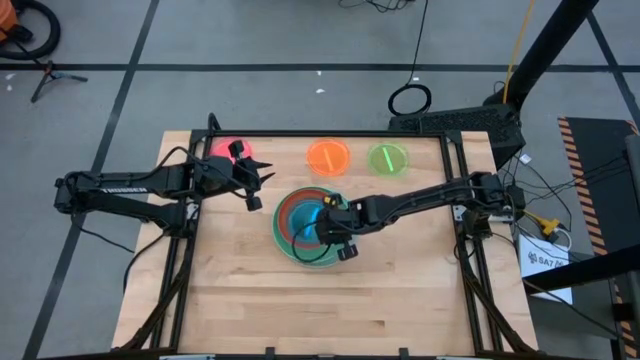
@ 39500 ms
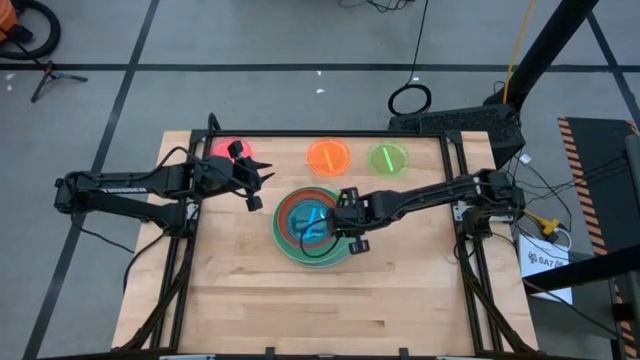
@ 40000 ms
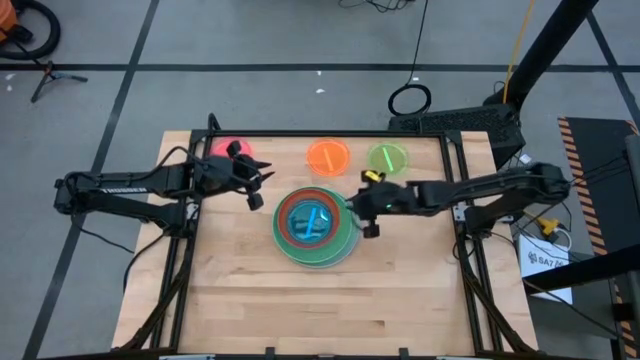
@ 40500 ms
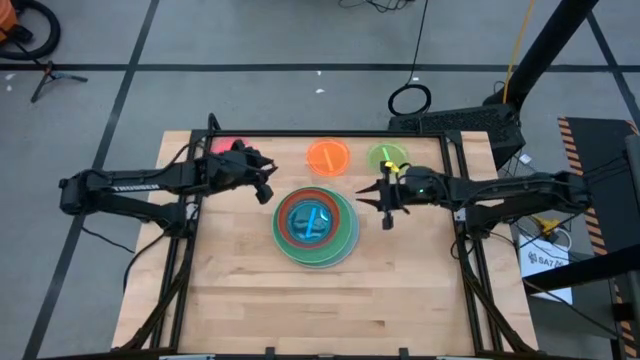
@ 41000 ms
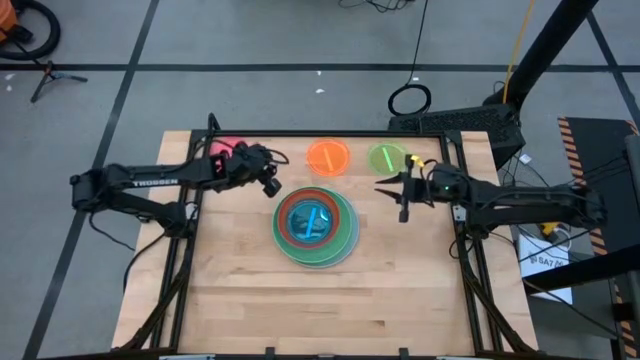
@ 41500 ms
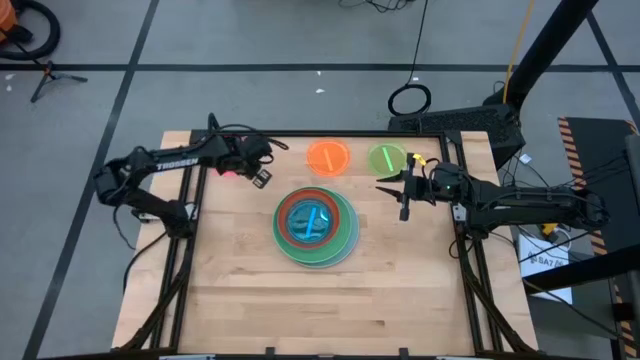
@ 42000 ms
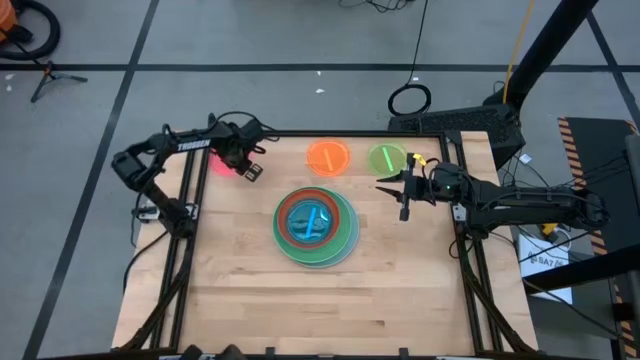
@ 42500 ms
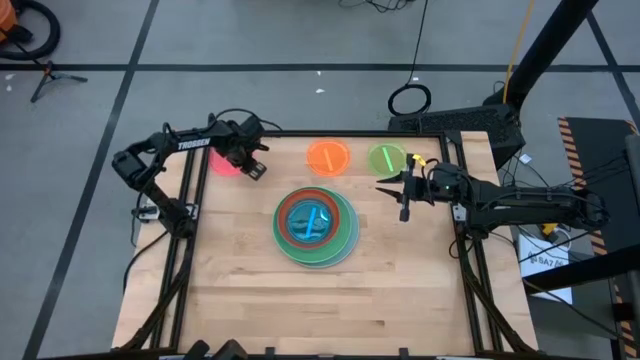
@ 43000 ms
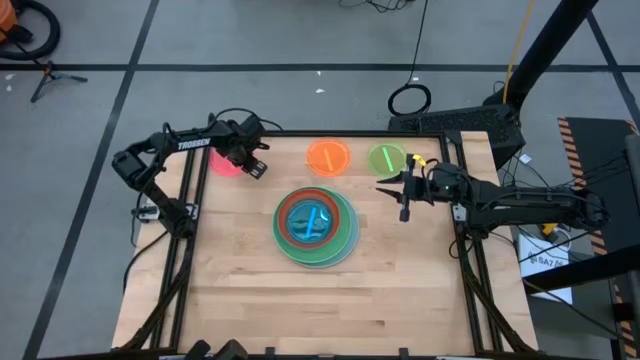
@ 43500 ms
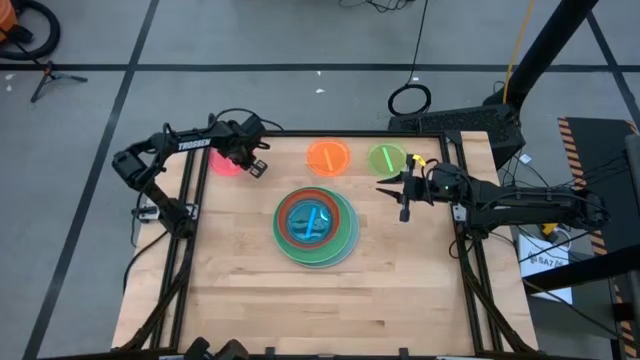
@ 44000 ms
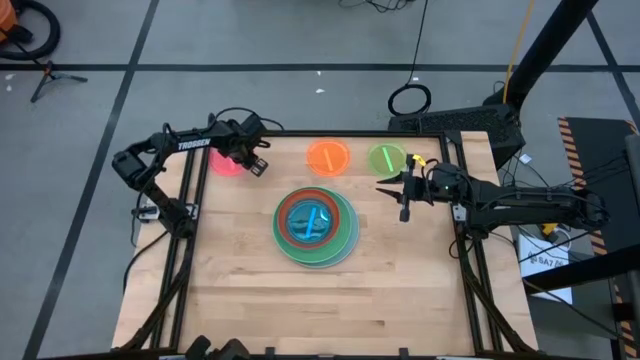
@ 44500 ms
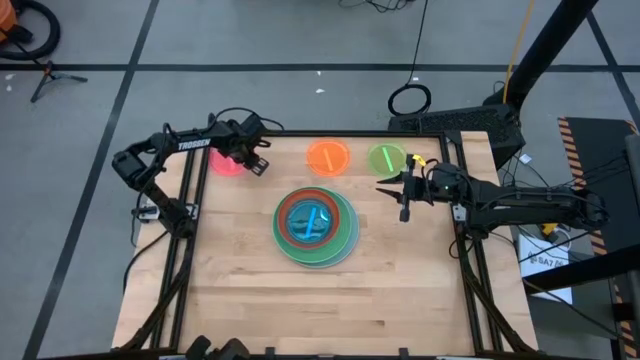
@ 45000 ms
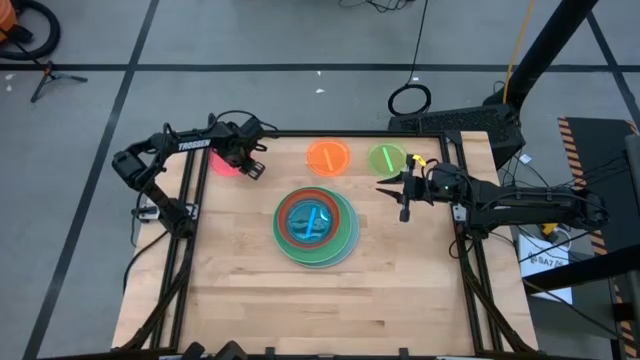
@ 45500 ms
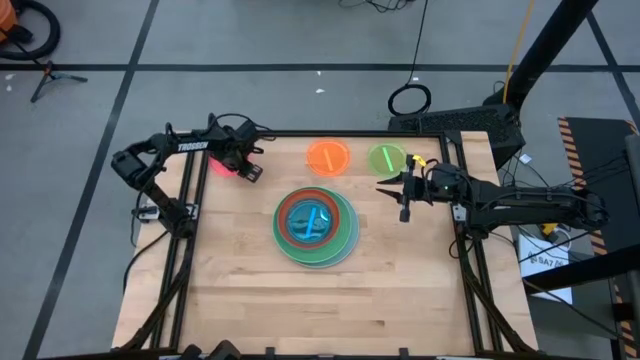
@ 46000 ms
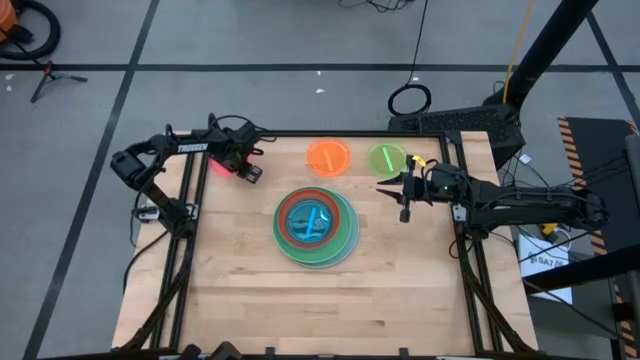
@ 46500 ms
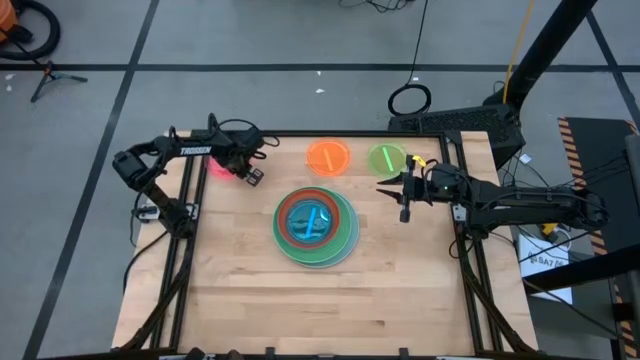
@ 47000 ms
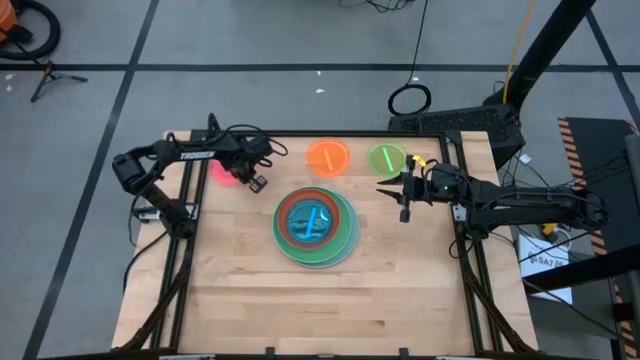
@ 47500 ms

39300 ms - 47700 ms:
Task: Stack plastic plates
Stack the pink plate on top of the blue plate

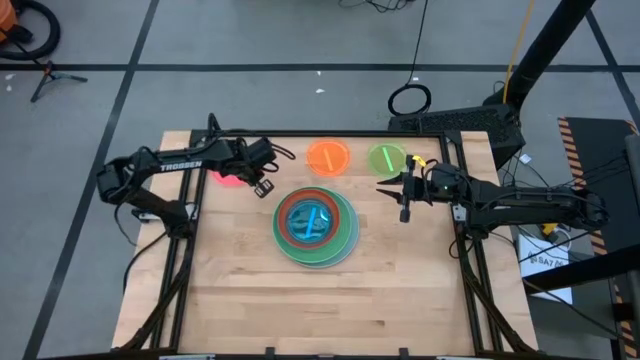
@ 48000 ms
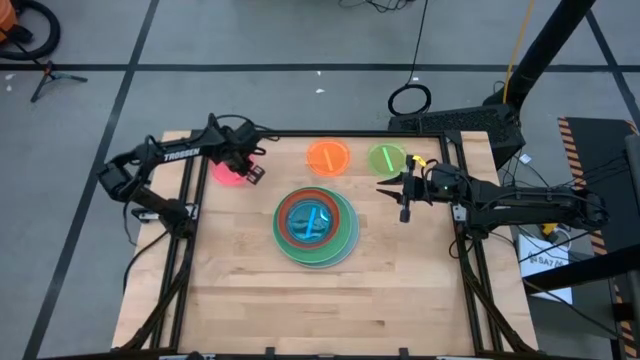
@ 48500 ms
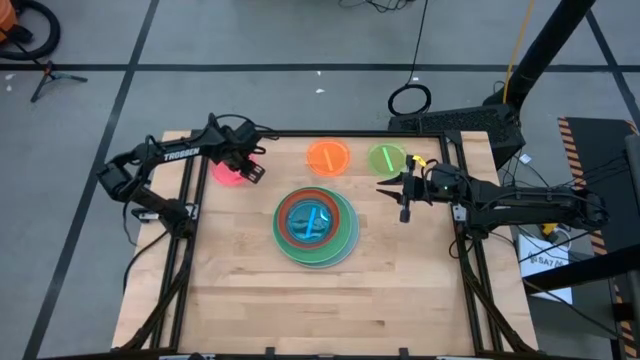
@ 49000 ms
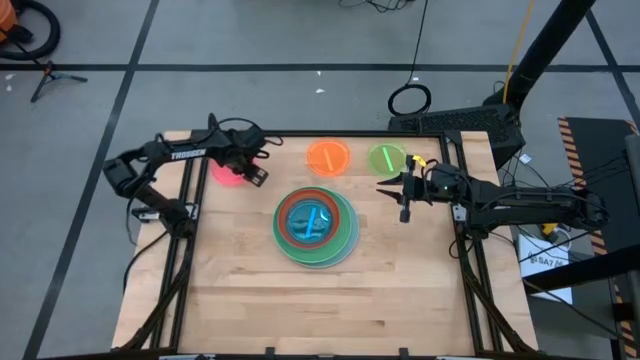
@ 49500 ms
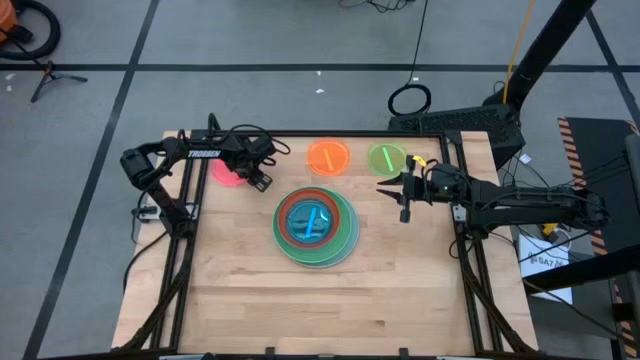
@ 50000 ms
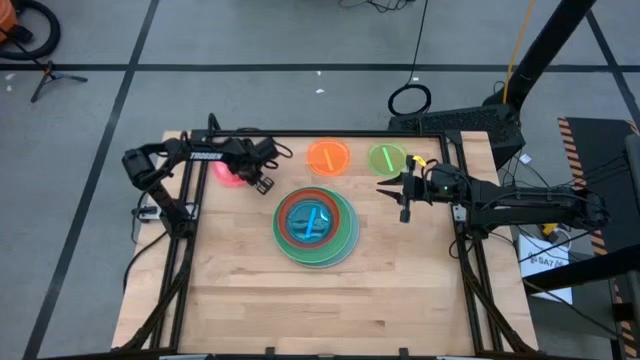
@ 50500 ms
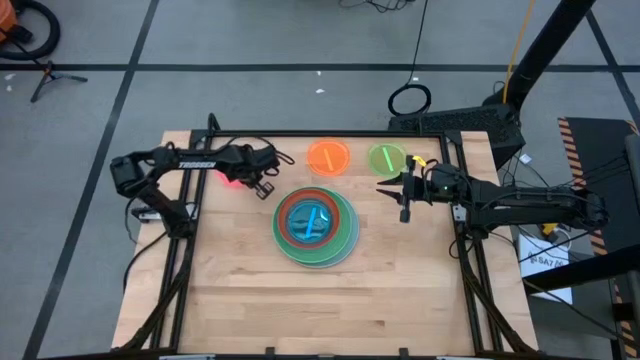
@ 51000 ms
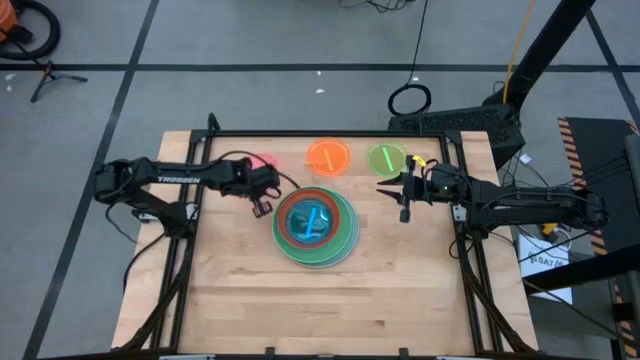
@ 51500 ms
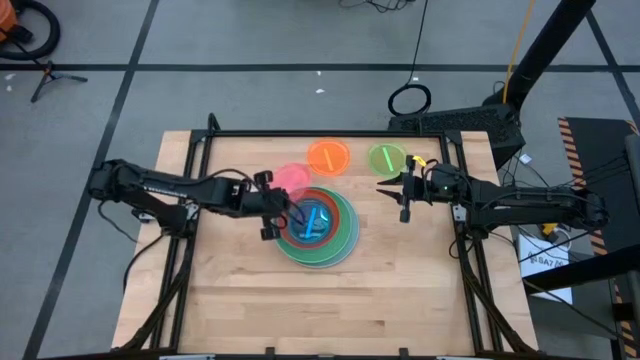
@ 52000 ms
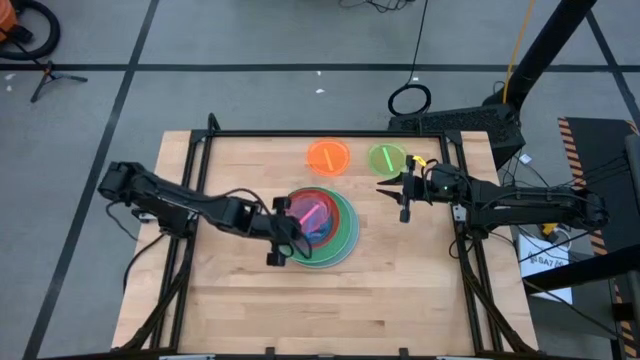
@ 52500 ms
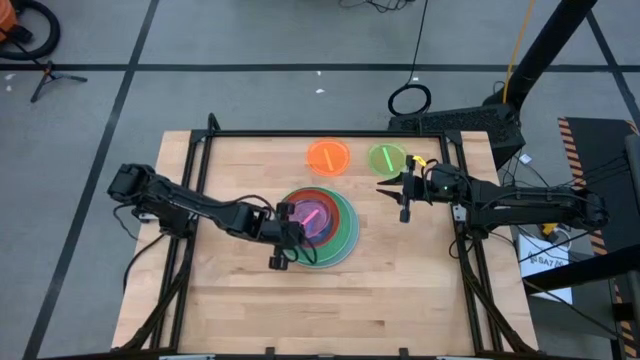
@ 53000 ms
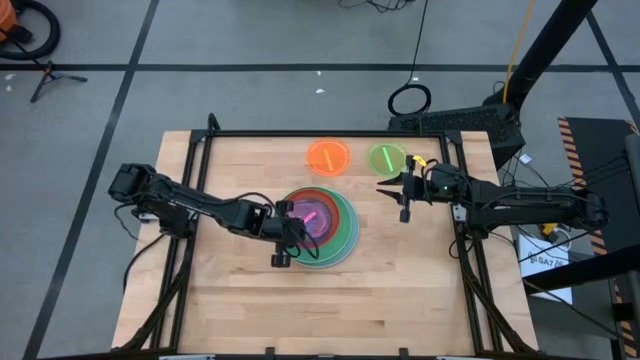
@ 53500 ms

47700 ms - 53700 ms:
Stack the pink plate on top of the blue plate

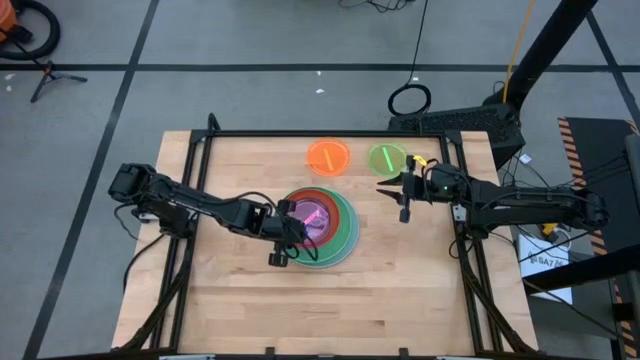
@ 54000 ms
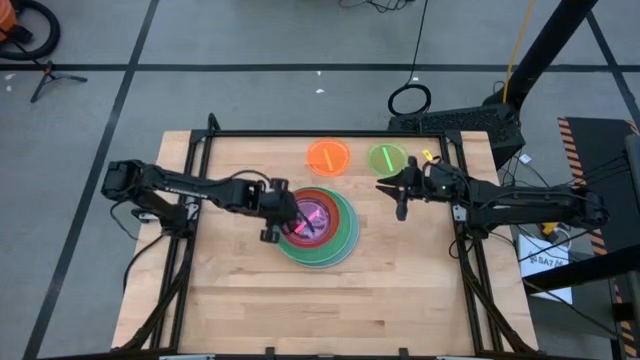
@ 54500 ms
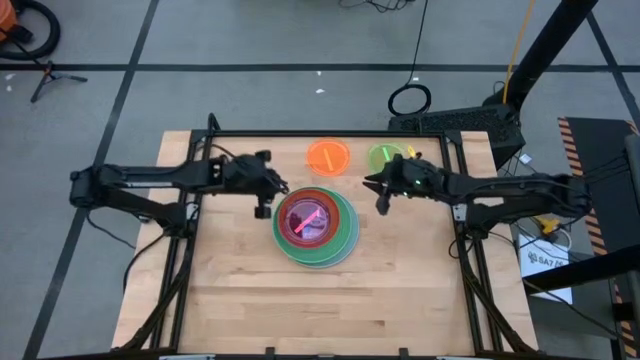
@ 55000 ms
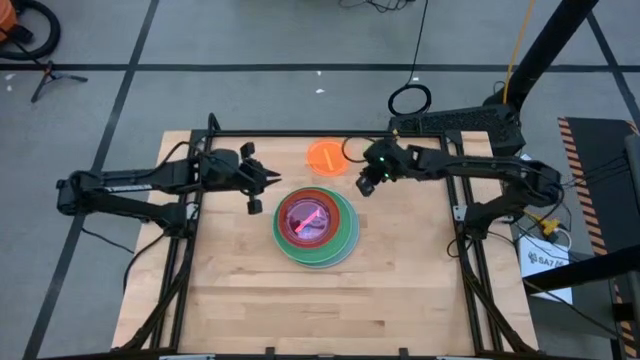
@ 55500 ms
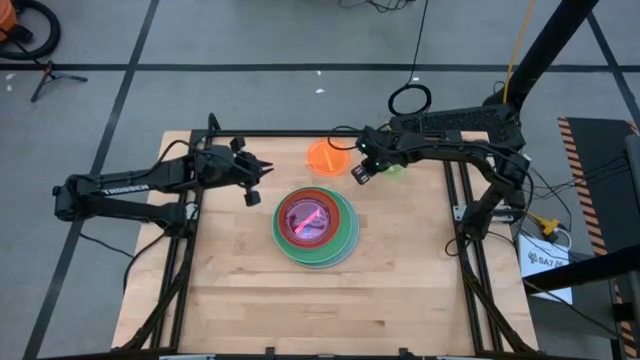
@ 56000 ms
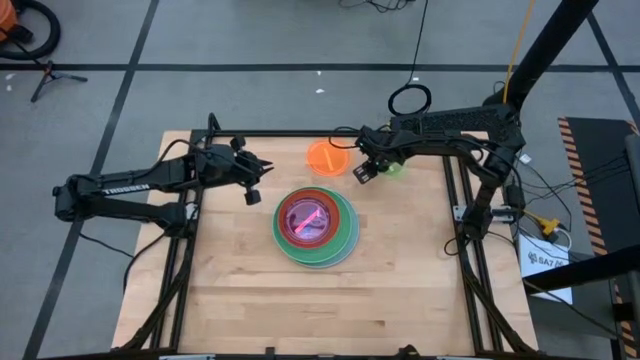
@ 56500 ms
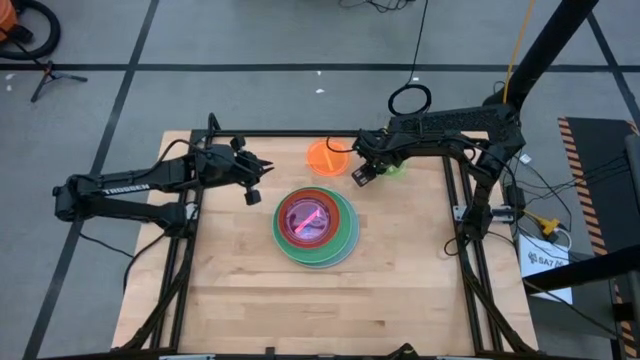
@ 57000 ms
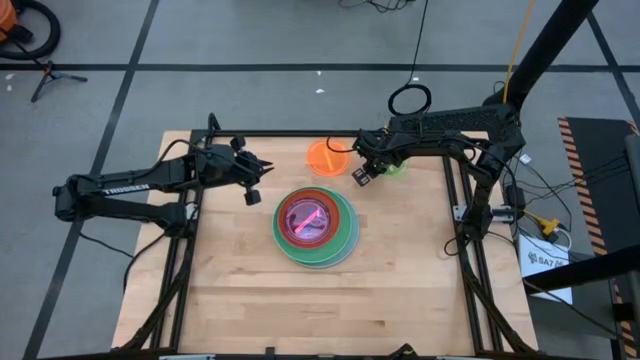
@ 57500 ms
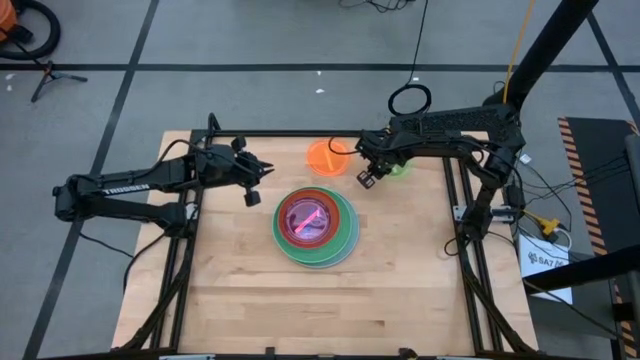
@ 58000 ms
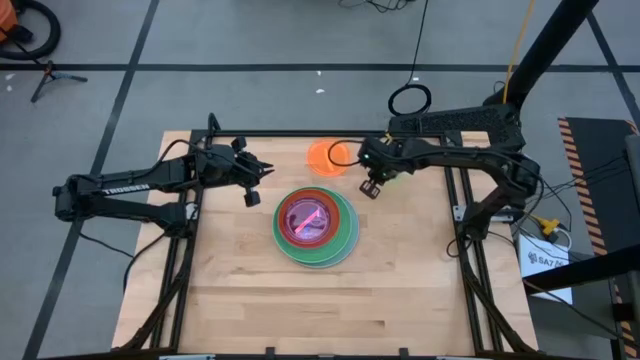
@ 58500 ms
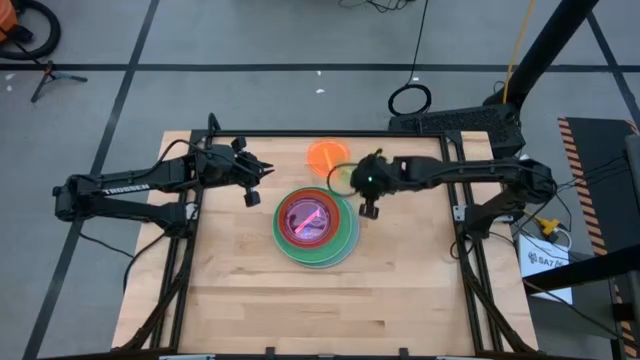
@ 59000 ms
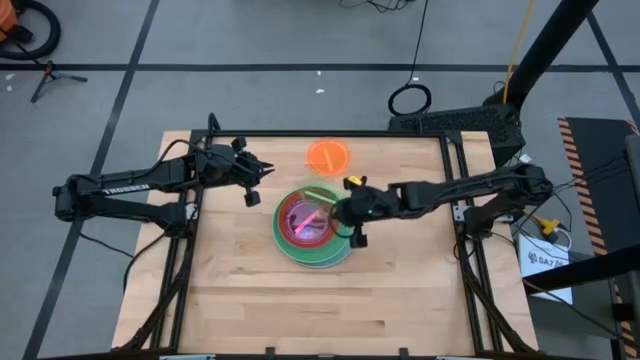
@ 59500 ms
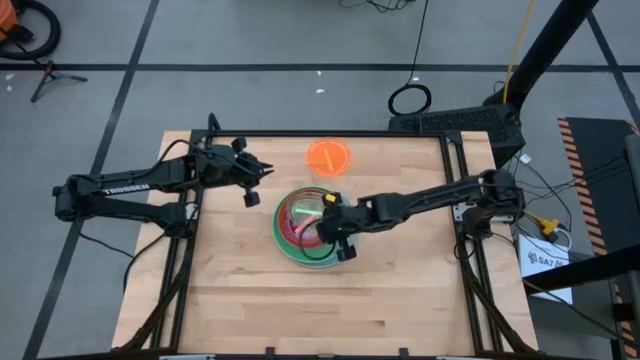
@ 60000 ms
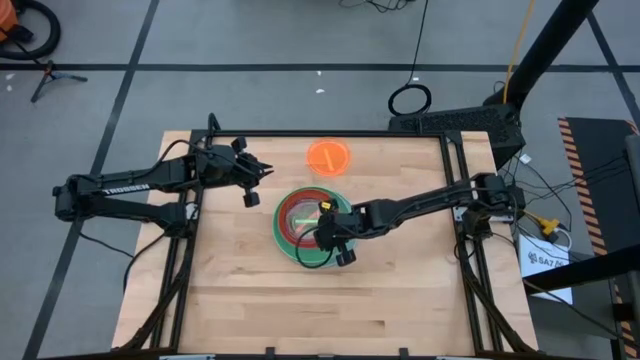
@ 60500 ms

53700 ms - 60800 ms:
Stack the light green plate on top of the pink plate

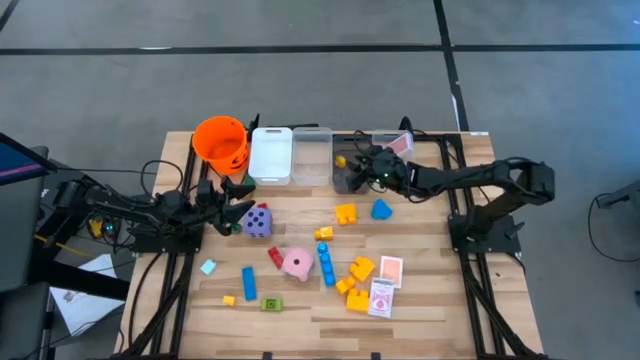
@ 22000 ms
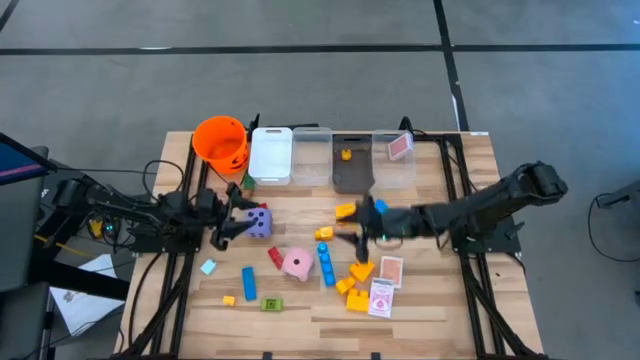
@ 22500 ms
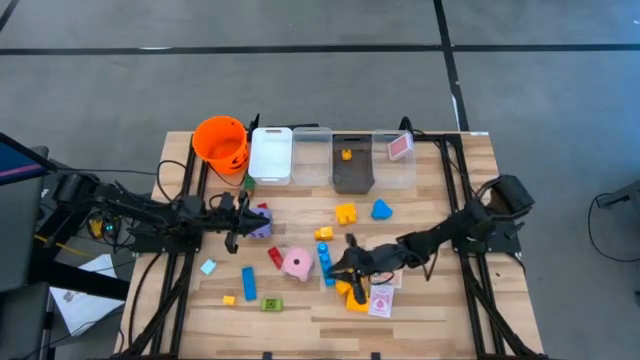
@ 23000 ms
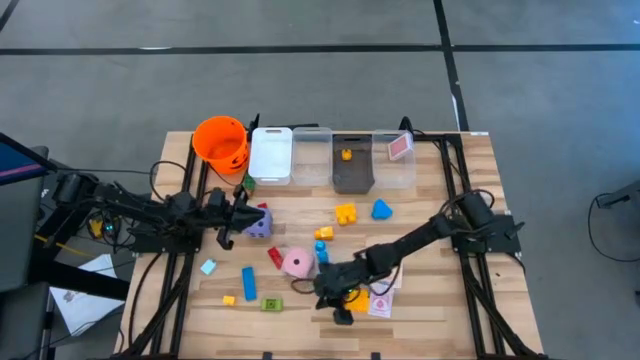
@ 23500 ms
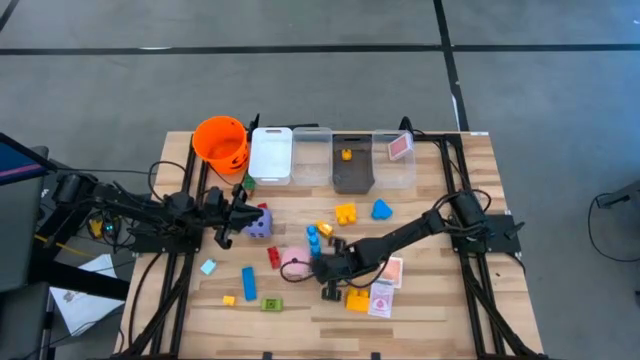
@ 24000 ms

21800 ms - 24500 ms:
Task: Pick & Place Toys
Adjust the blue stud game piece on the table
